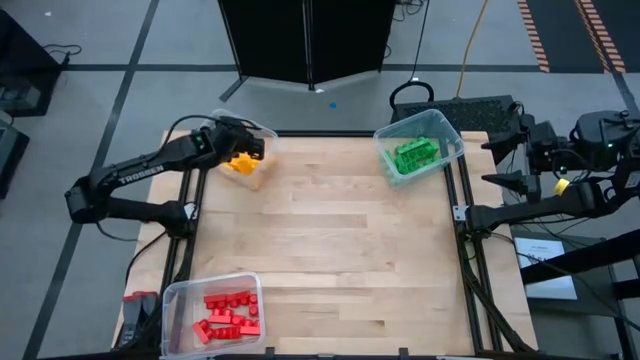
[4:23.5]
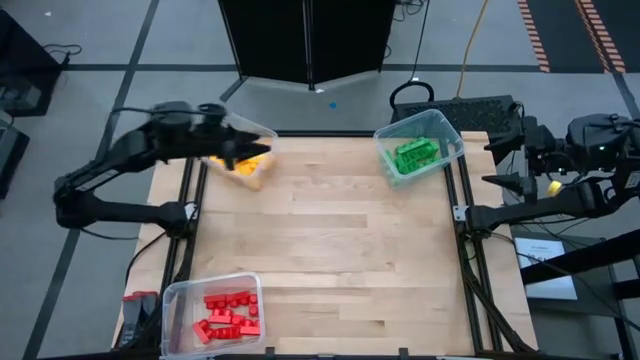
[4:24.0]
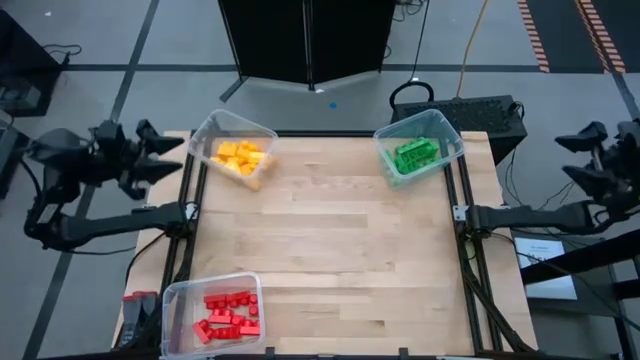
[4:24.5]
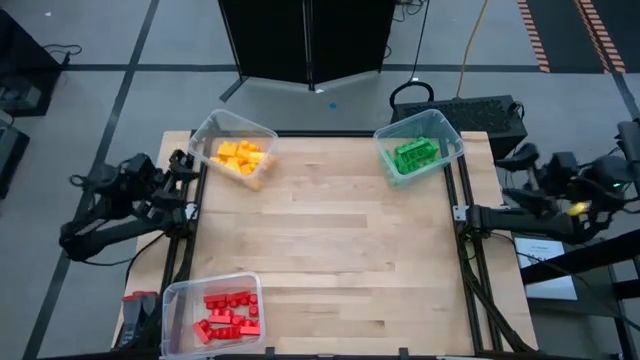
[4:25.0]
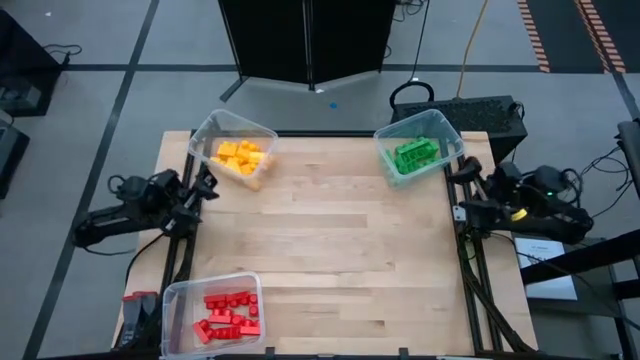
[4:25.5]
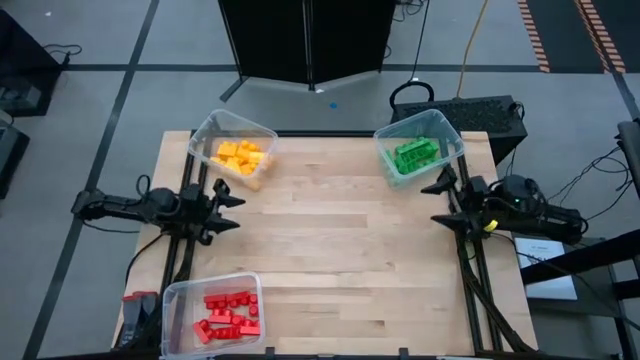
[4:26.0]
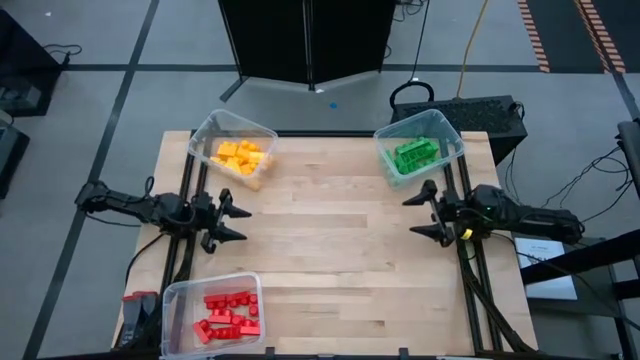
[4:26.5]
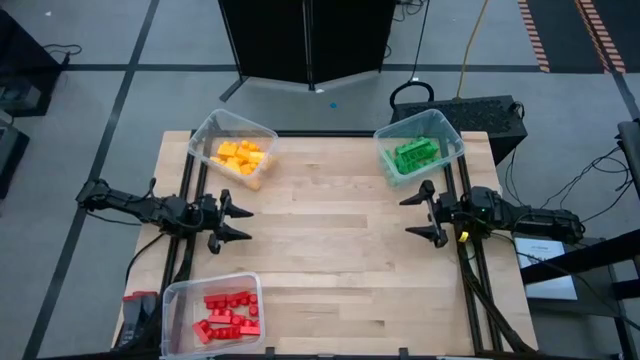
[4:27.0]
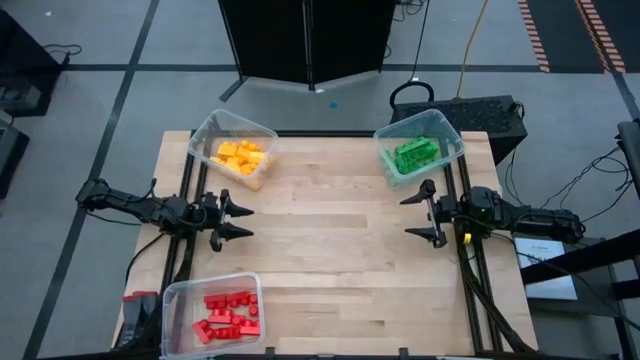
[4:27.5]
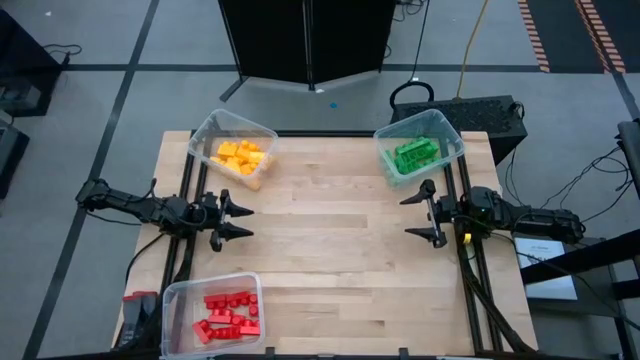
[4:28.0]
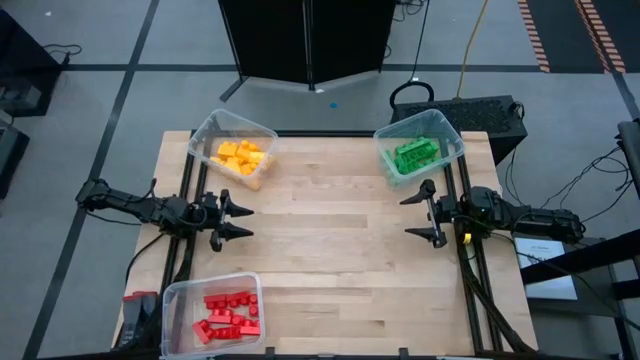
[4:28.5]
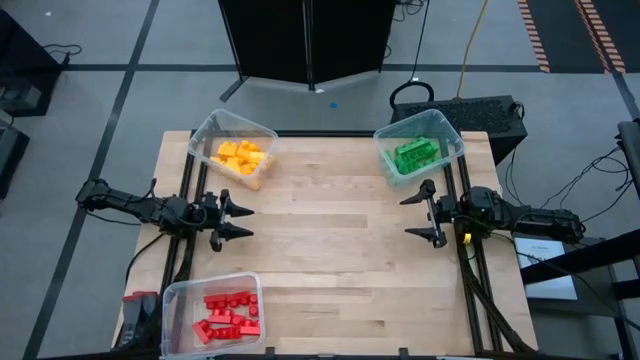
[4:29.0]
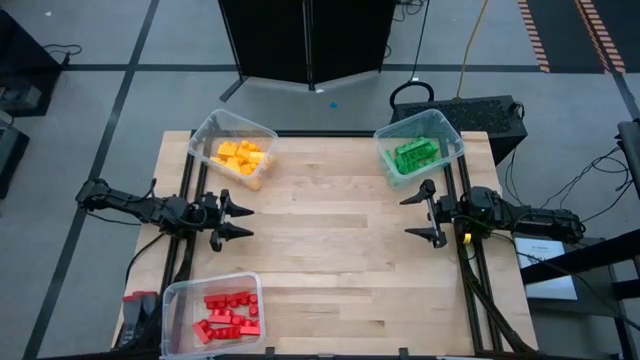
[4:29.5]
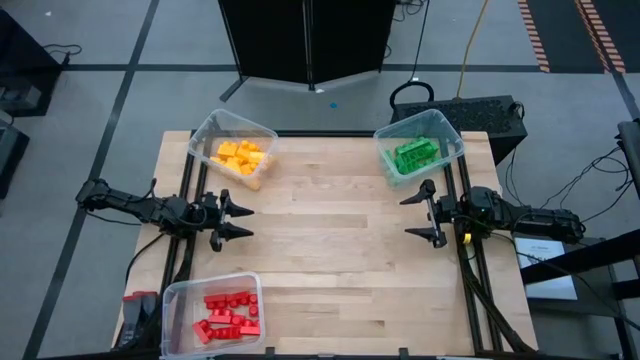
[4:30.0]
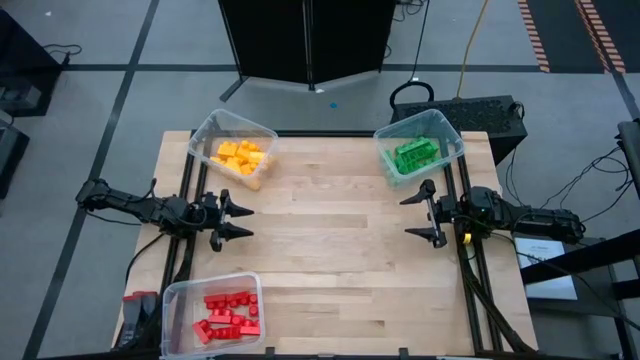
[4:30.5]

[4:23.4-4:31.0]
Task: Sort blocks
Return to Home Position

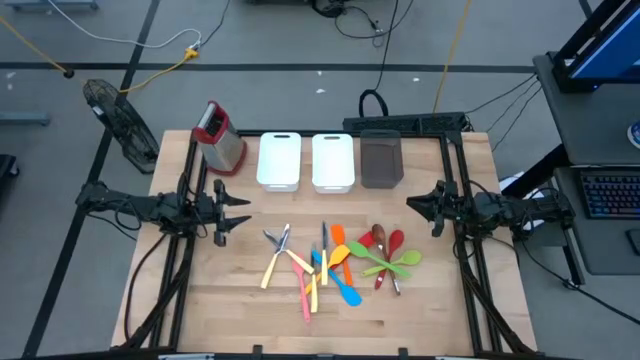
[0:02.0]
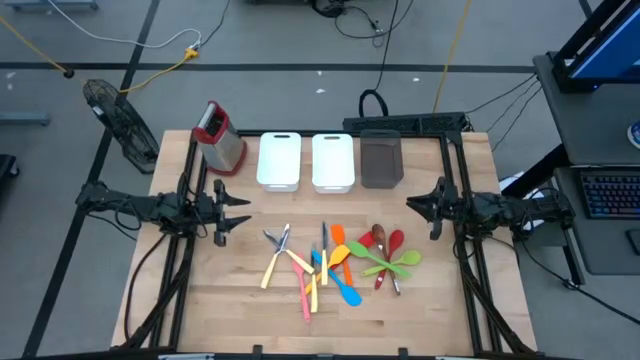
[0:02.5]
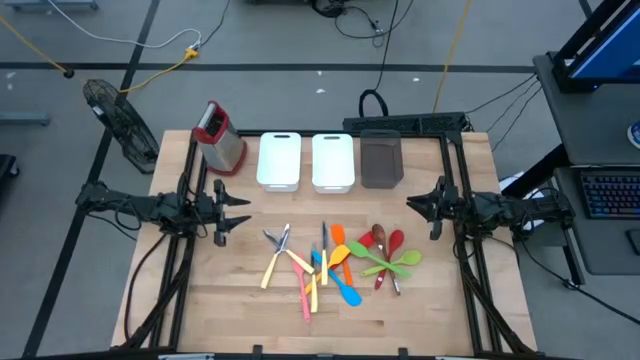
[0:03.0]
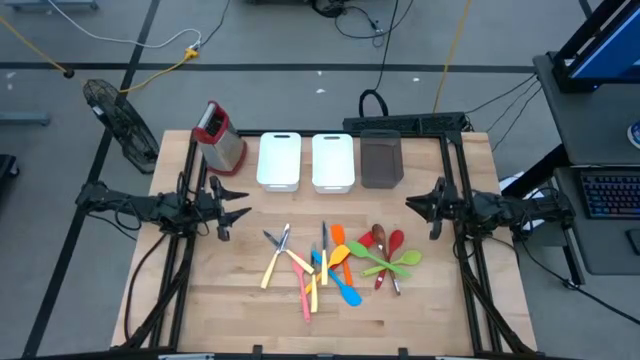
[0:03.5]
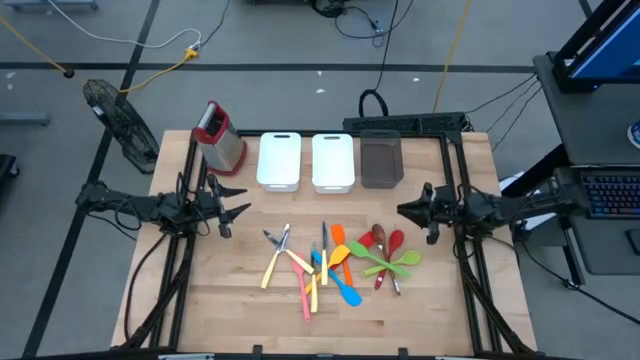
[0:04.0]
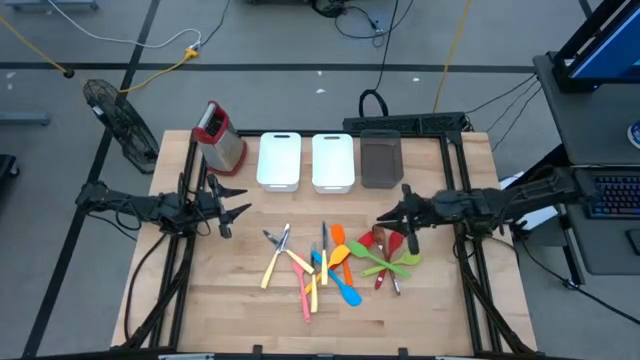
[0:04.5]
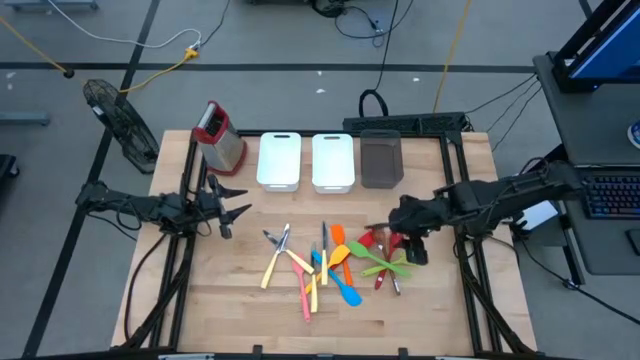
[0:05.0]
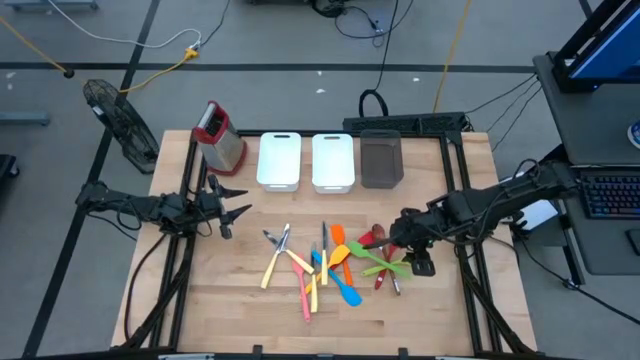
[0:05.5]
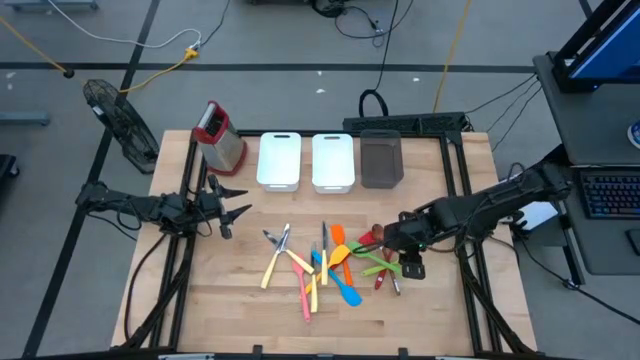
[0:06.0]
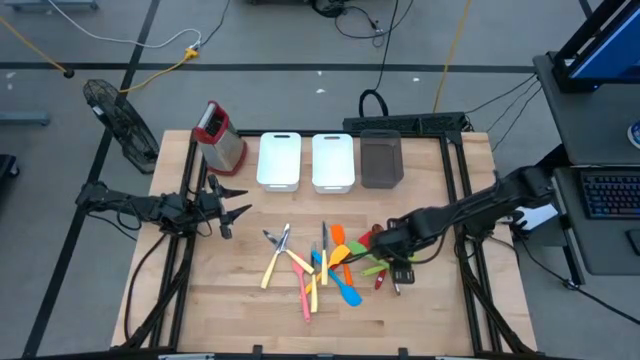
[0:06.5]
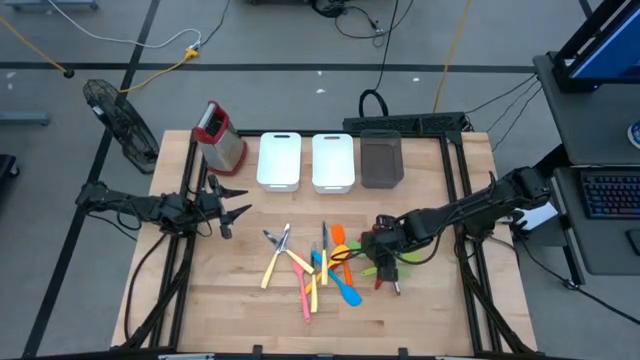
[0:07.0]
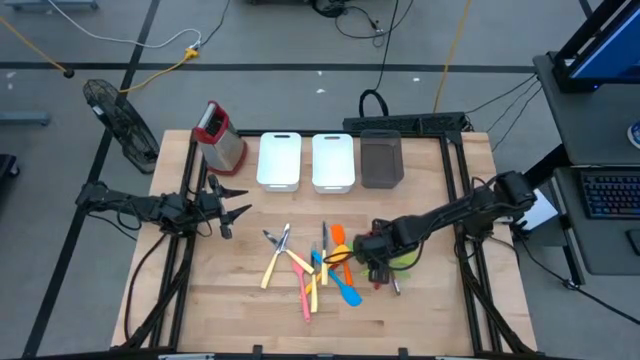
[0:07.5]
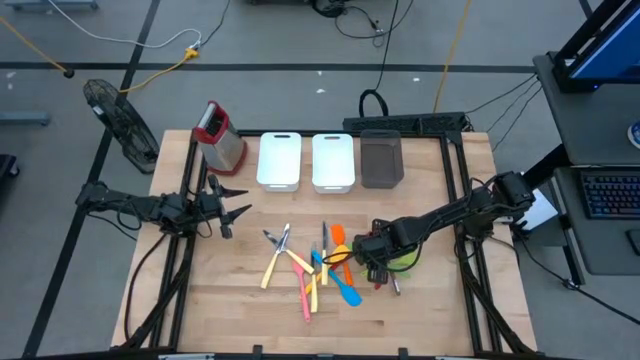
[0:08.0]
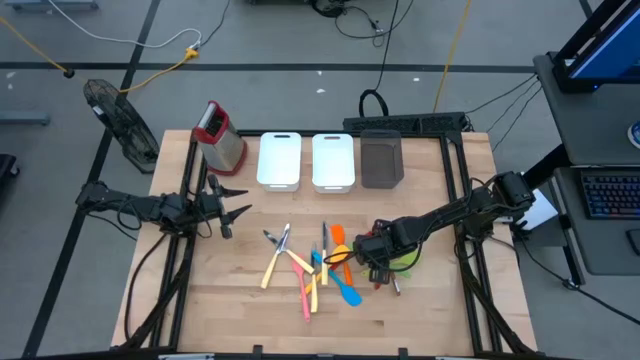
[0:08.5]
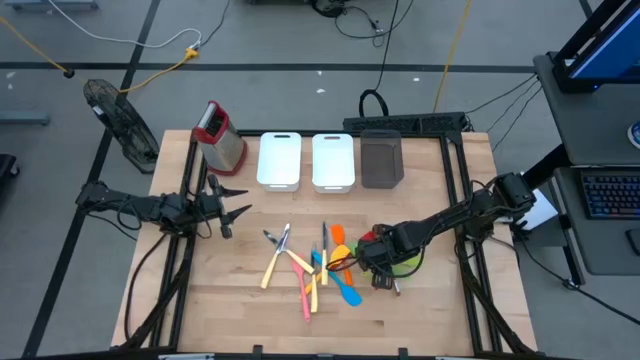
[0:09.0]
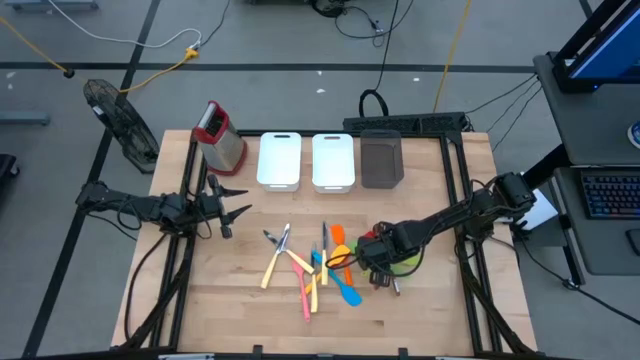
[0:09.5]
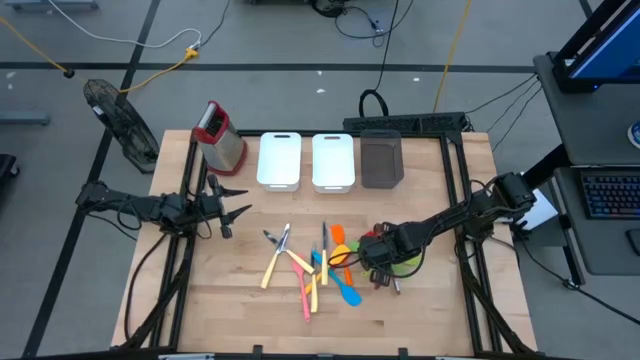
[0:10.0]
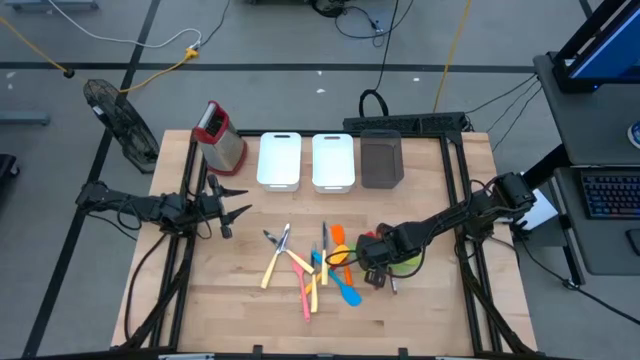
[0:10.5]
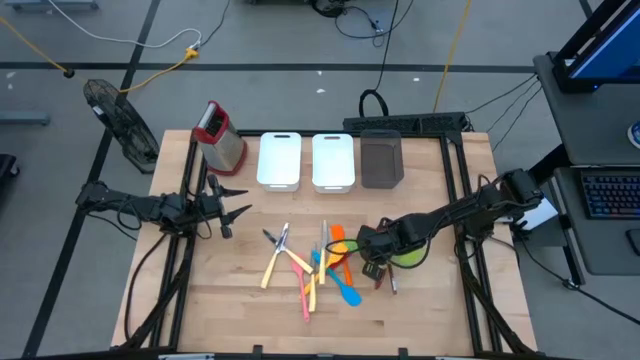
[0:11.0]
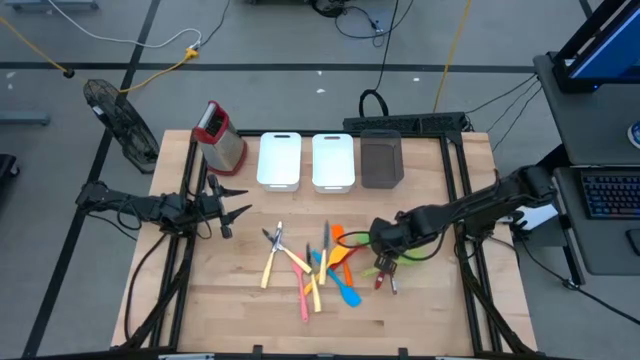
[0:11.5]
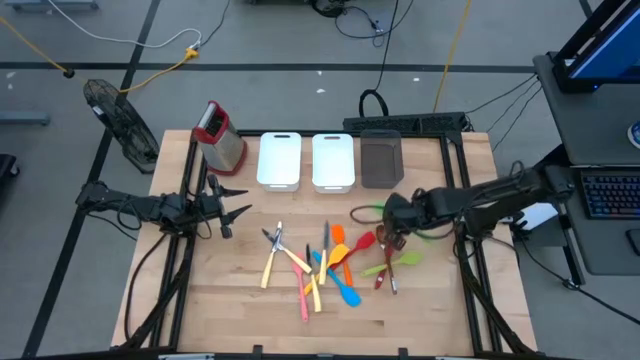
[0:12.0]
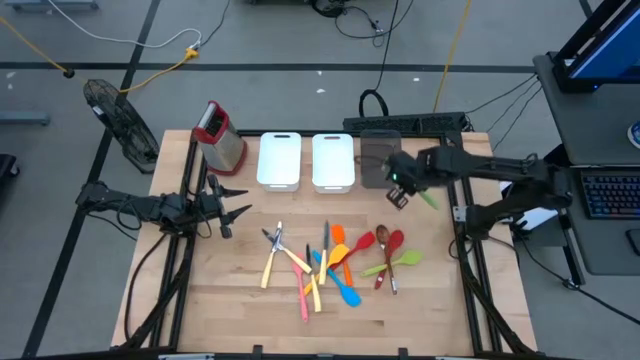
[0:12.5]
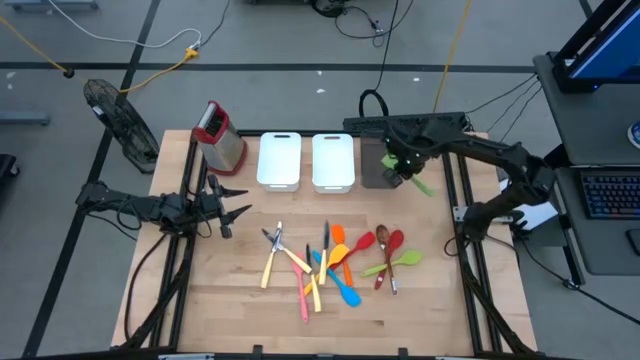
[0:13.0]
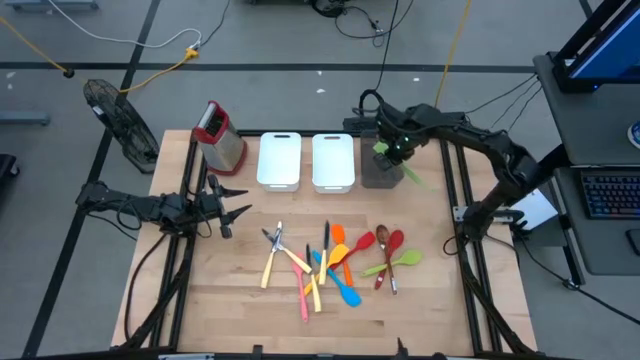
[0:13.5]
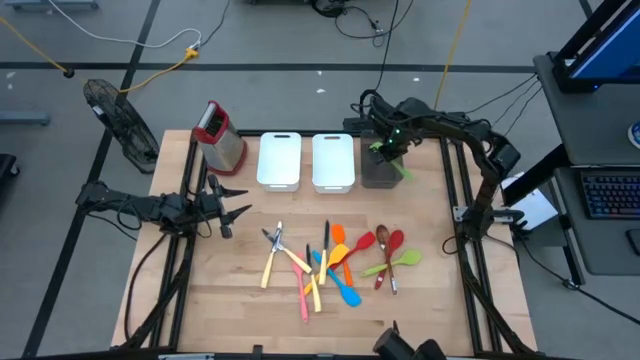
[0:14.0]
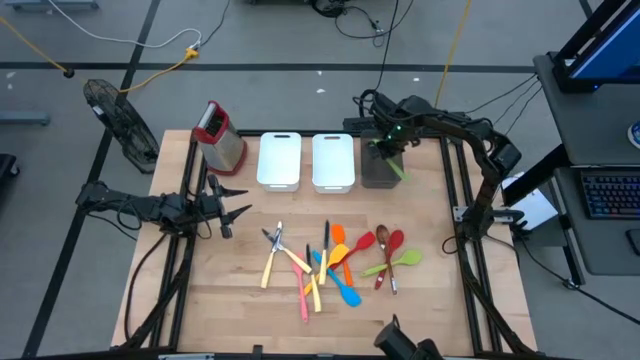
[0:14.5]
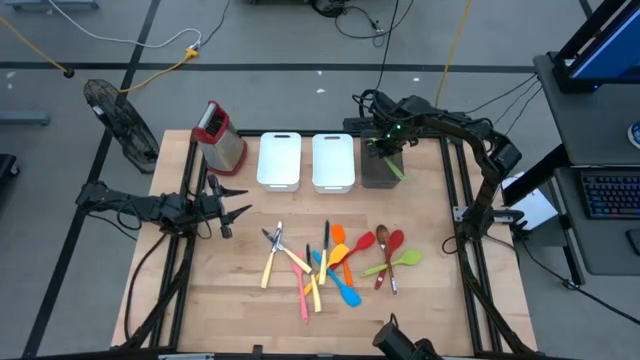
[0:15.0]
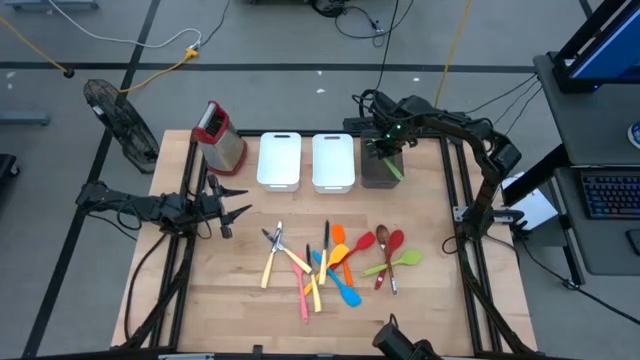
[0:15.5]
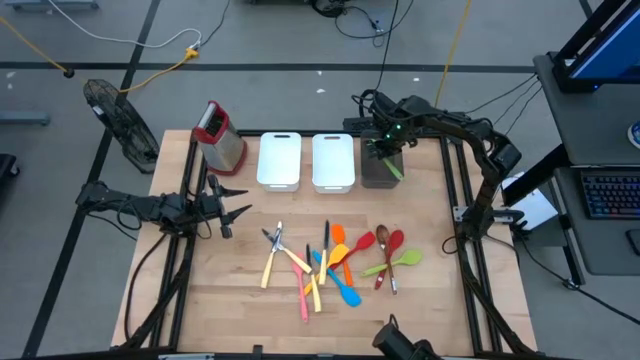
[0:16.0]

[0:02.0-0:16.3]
Task: Pick & Place Kitchen Items
Put the green spatula into the black bin
